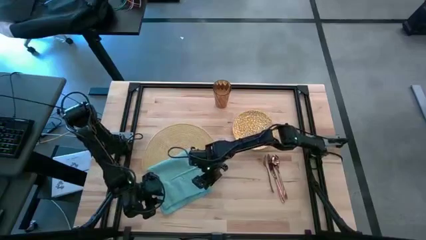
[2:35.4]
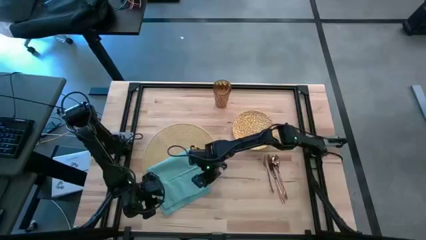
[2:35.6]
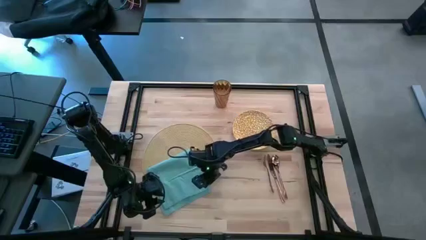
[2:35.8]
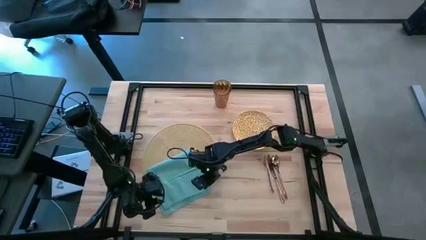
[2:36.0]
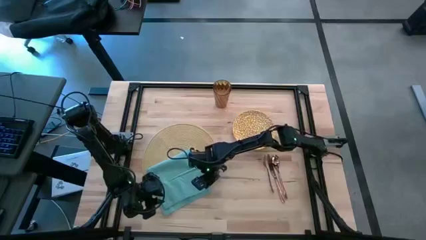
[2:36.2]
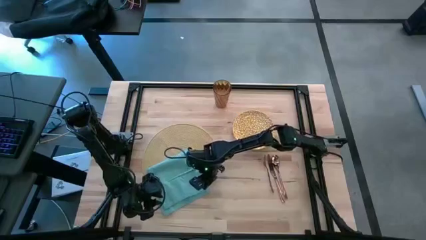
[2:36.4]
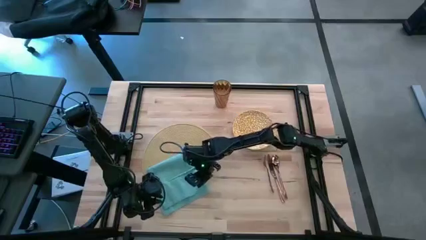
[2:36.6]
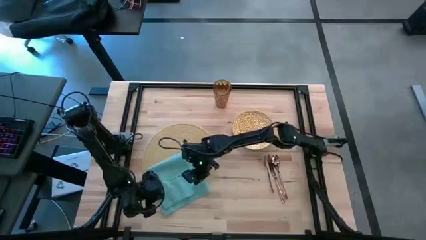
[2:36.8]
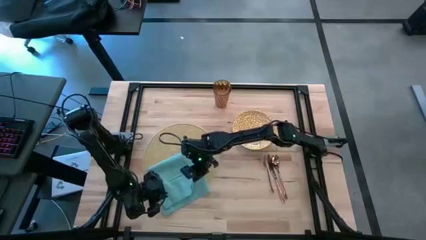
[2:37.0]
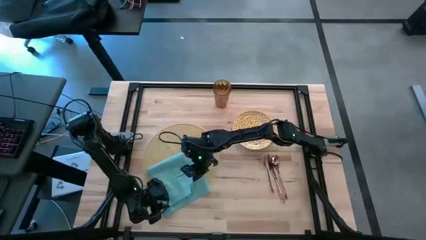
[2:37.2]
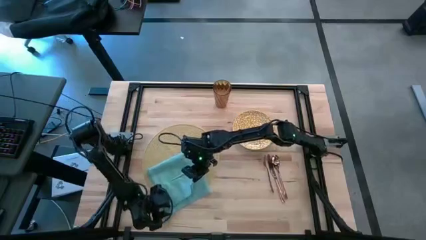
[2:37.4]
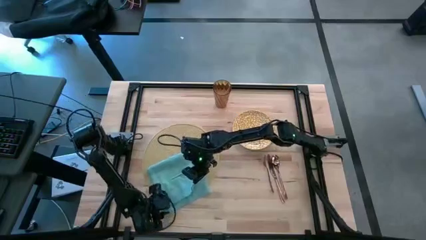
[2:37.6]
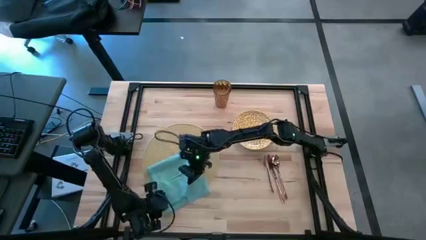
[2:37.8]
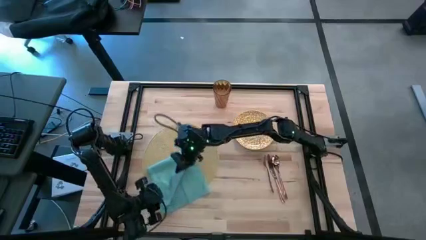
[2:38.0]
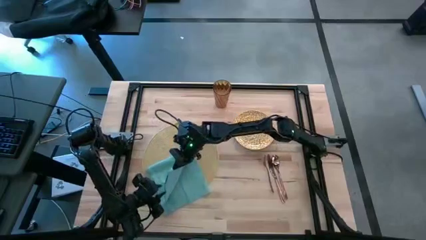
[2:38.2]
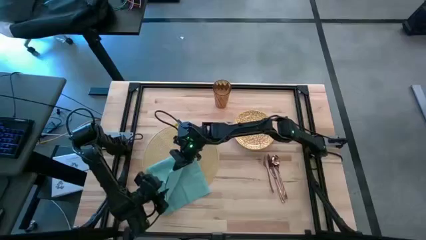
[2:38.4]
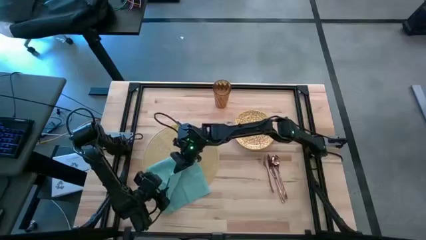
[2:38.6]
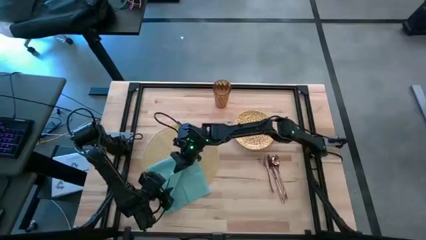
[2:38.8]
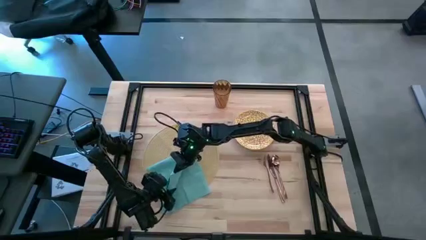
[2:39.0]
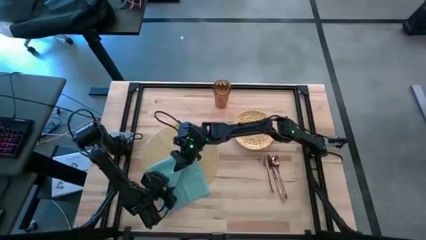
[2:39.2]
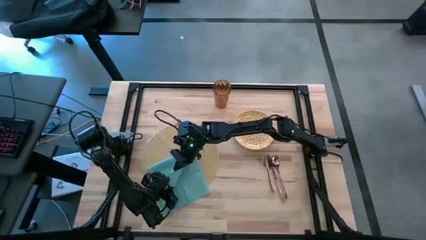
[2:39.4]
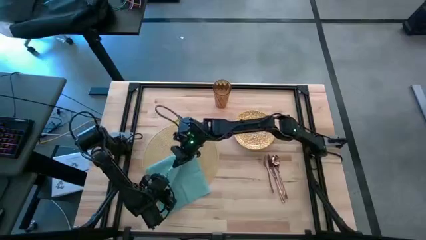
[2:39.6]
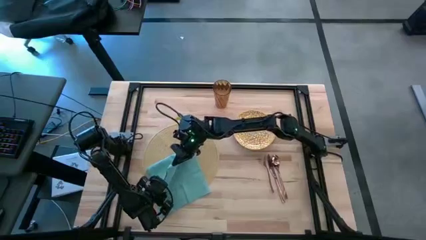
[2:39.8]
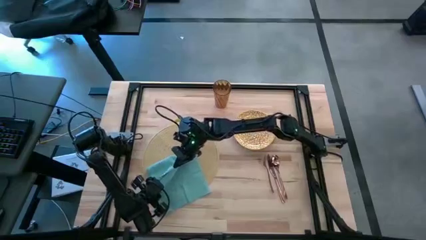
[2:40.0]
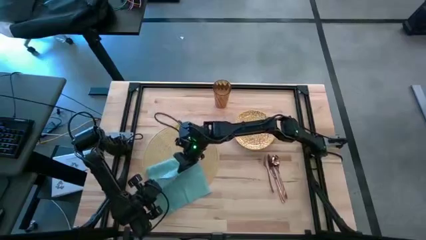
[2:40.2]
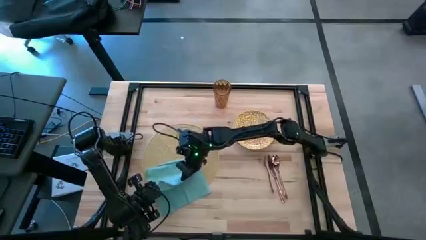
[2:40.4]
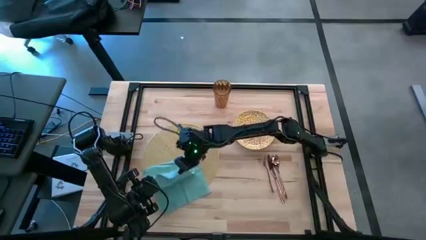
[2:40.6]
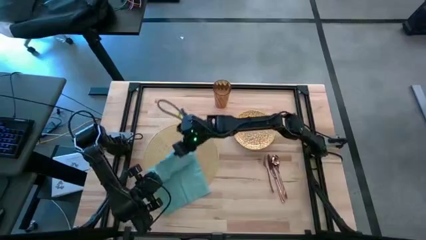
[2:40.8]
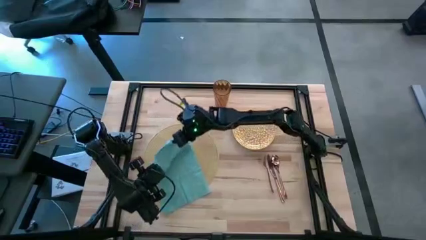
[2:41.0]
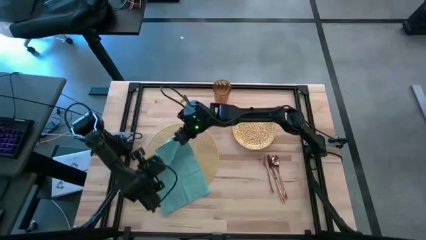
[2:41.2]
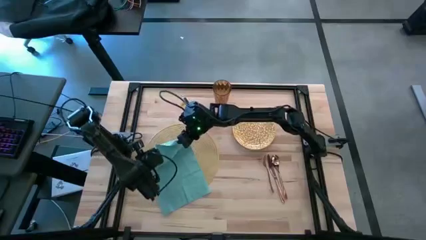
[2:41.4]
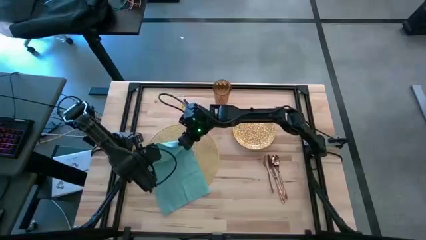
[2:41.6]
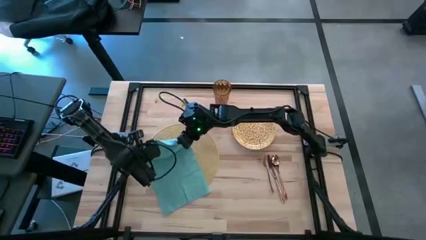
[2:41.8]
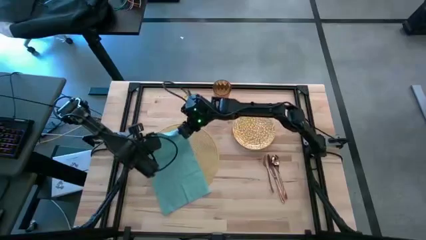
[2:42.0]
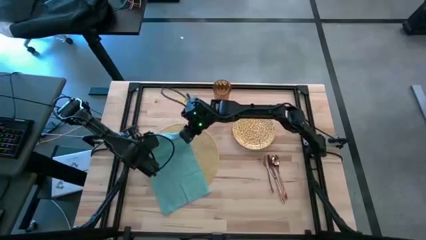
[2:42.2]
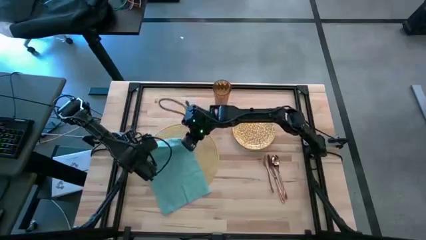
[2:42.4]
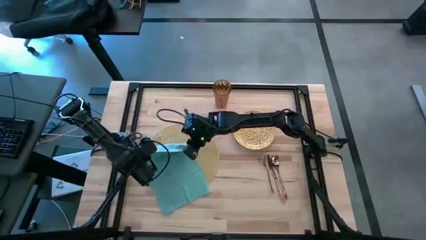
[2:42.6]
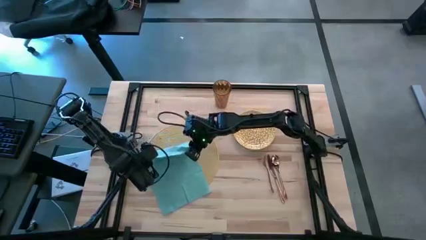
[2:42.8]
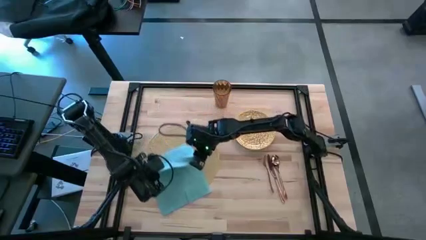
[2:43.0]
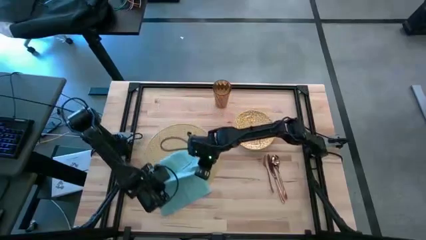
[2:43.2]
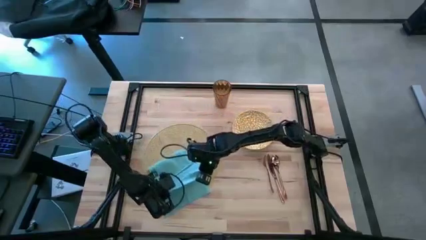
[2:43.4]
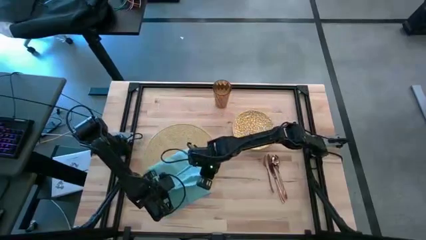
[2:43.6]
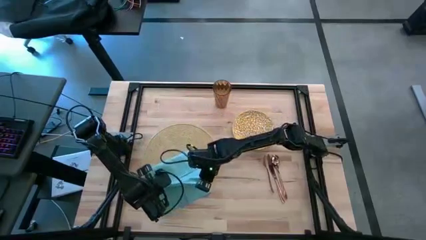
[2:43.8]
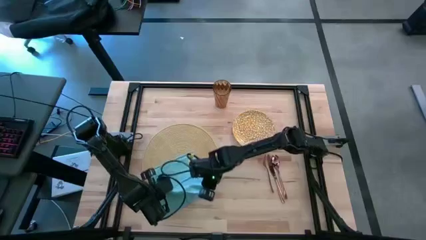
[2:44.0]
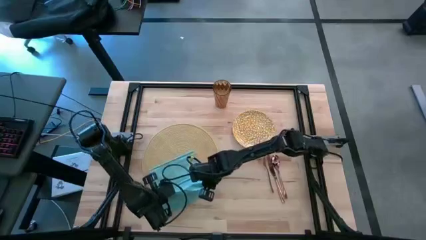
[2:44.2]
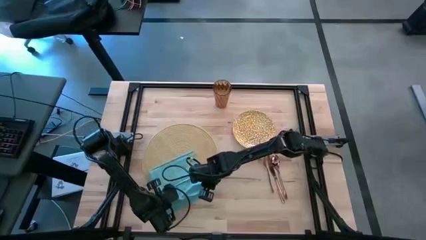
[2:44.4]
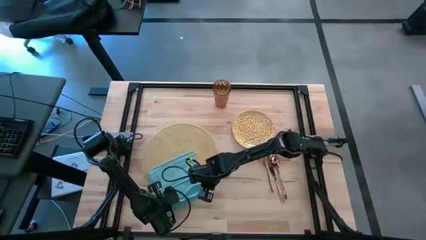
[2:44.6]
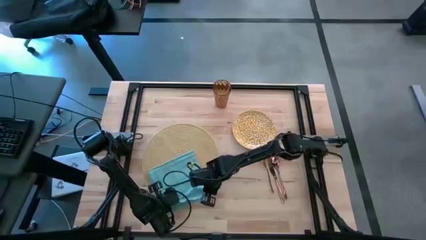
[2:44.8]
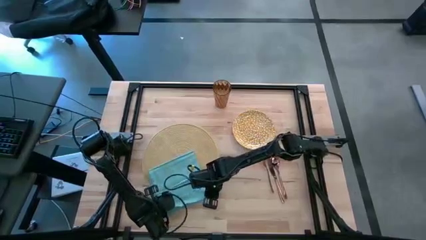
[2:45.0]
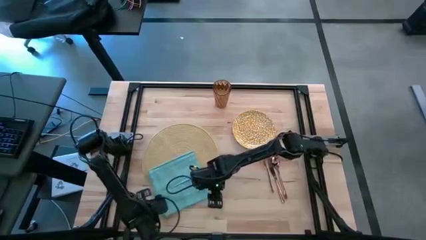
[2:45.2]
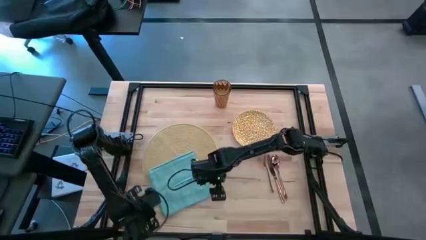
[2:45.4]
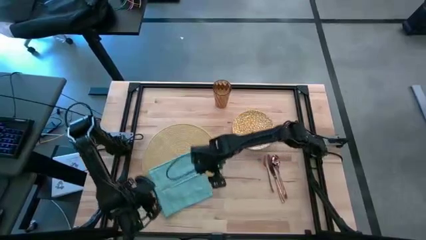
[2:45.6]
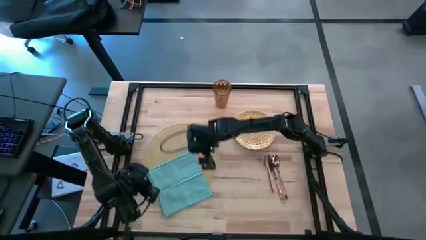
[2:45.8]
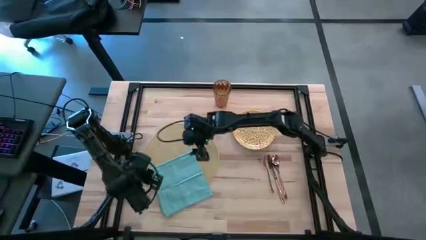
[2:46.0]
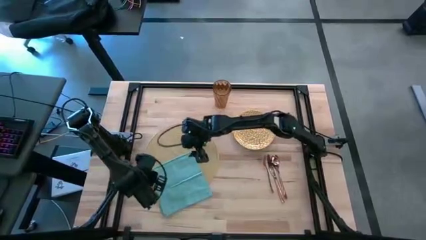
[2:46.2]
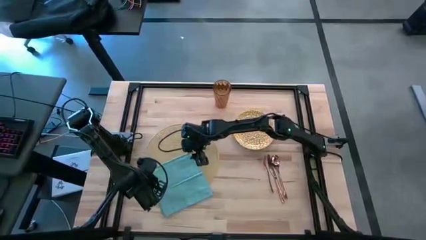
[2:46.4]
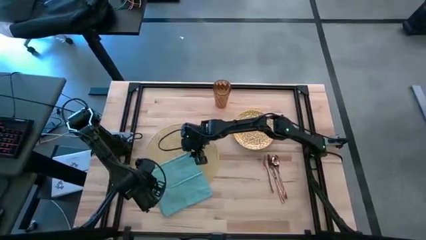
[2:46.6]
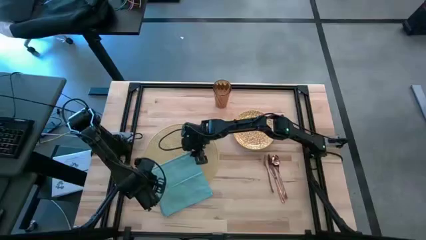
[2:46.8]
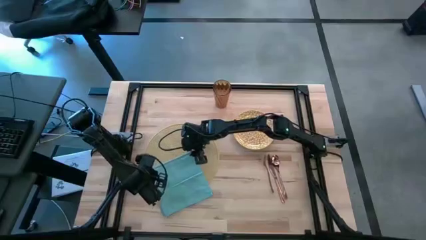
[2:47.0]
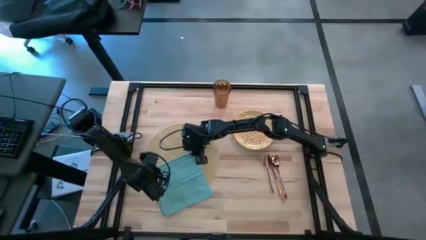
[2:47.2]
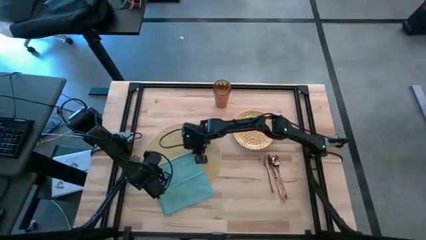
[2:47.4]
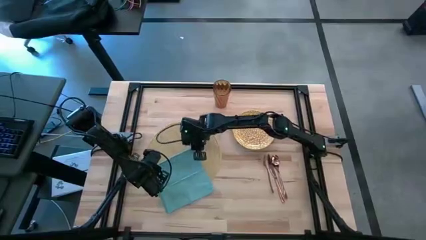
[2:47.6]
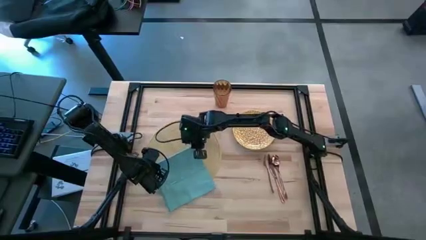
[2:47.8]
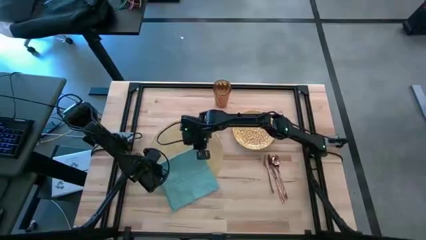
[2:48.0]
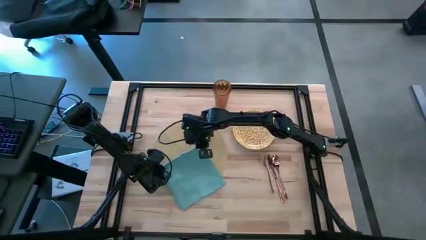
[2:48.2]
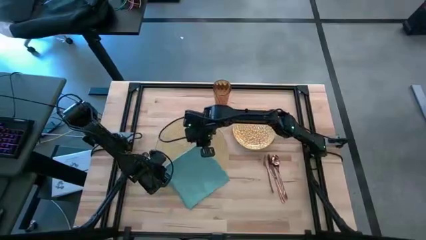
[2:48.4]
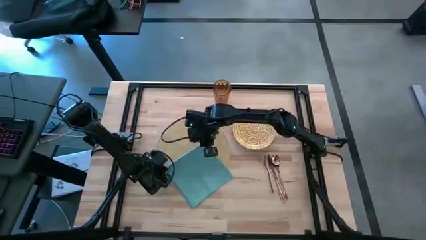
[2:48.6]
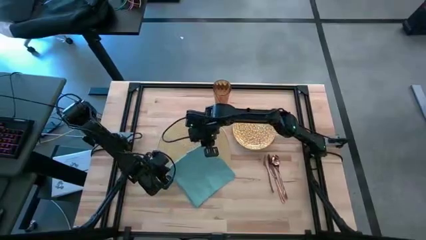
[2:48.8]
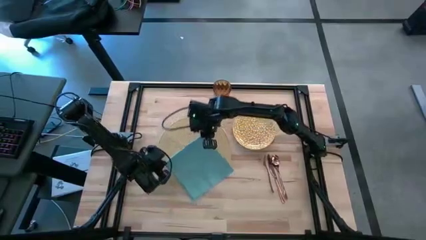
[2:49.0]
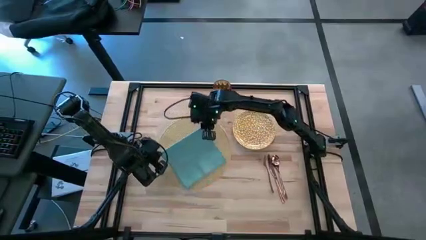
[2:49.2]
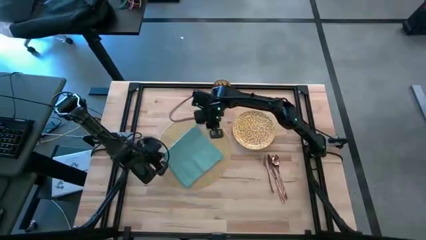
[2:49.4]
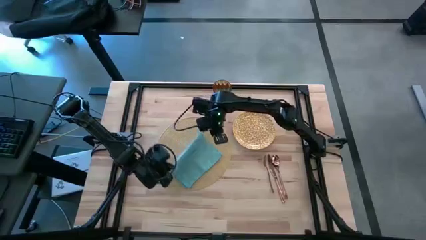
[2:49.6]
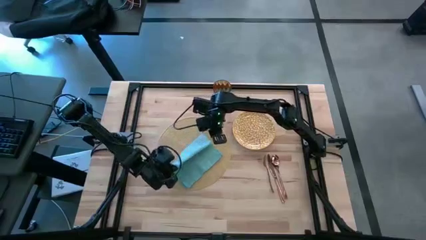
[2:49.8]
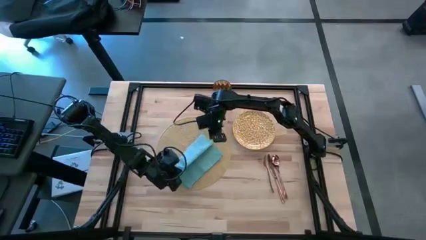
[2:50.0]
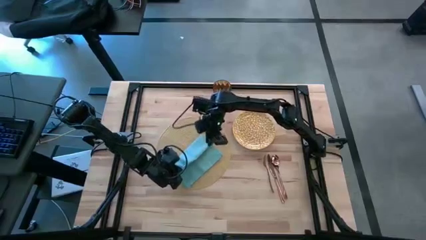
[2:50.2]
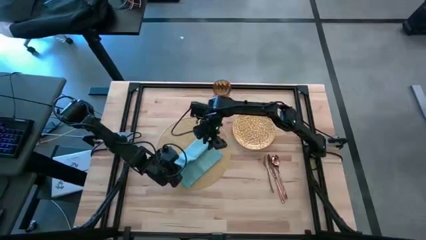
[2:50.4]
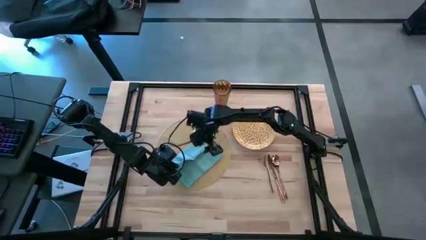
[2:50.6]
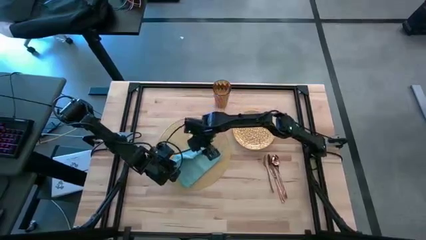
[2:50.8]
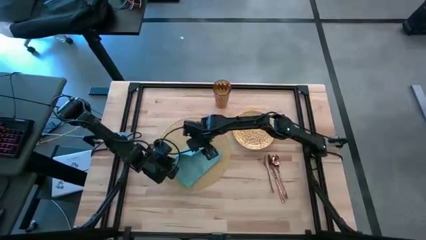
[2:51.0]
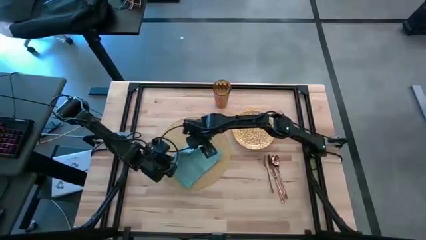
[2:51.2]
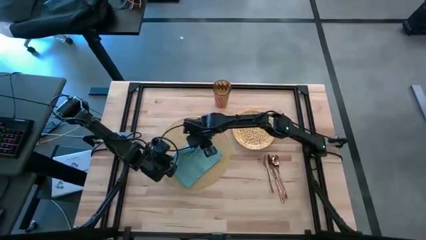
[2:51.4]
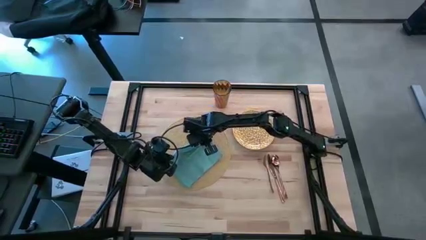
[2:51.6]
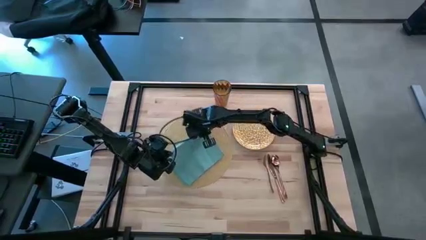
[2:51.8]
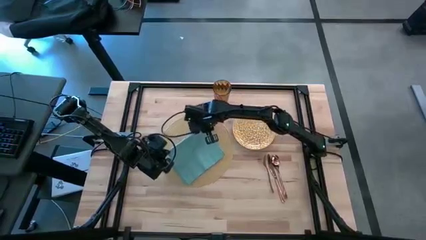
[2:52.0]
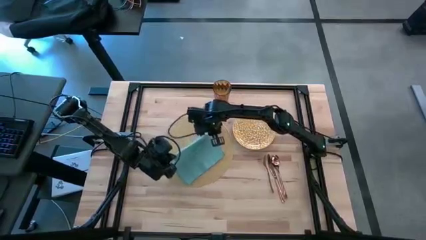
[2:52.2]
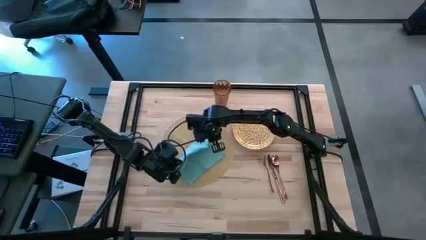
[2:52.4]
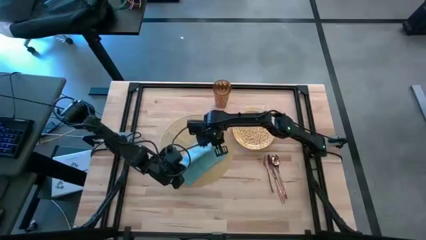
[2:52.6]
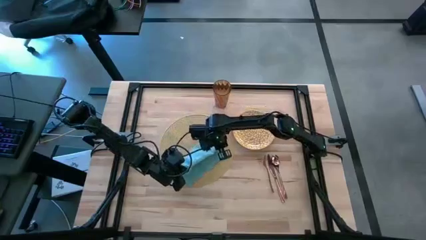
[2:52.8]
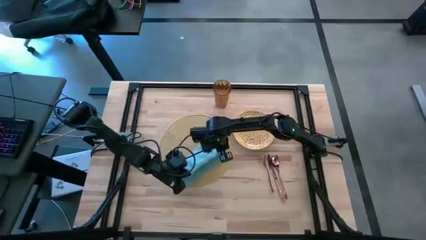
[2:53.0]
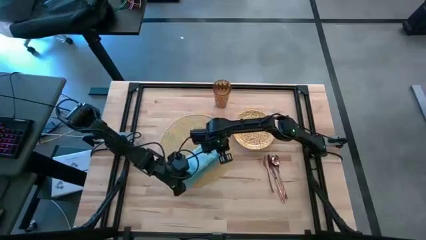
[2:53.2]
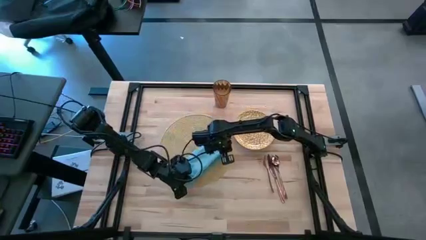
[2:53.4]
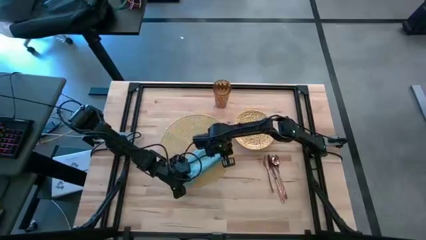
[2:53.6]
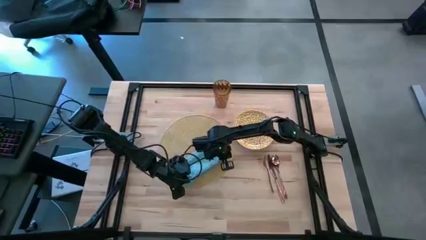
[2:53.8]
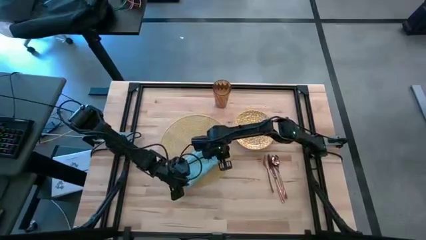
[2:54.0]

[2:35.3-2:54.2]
Task: Set table place
Fold the blue table napkin
